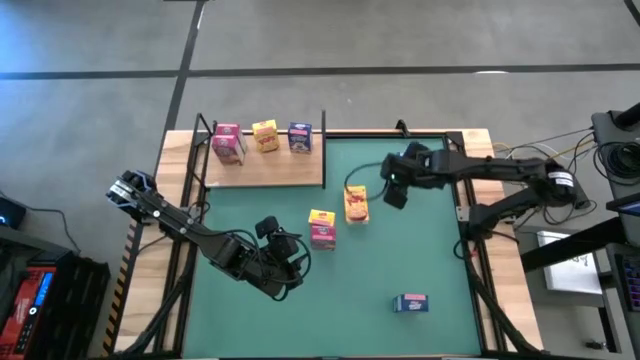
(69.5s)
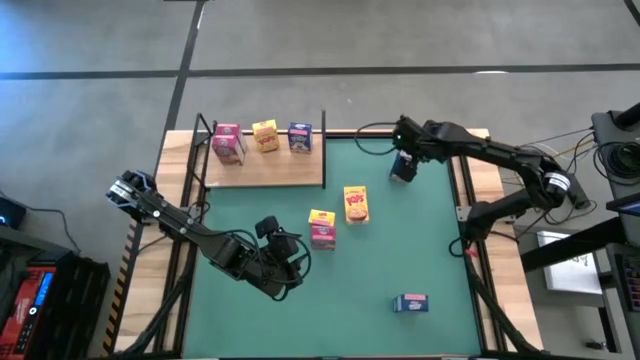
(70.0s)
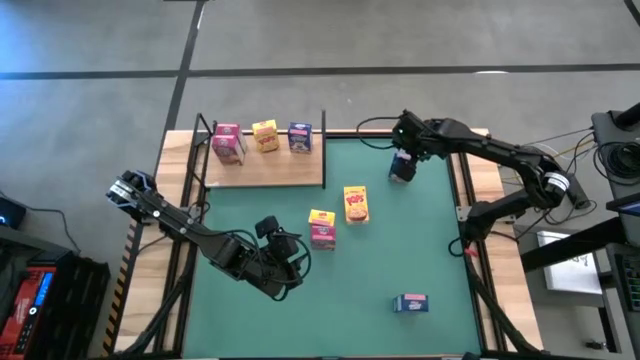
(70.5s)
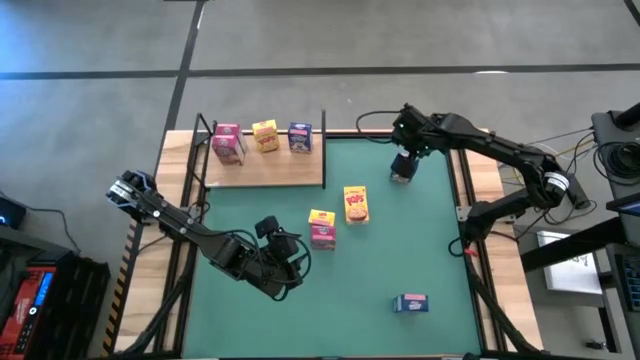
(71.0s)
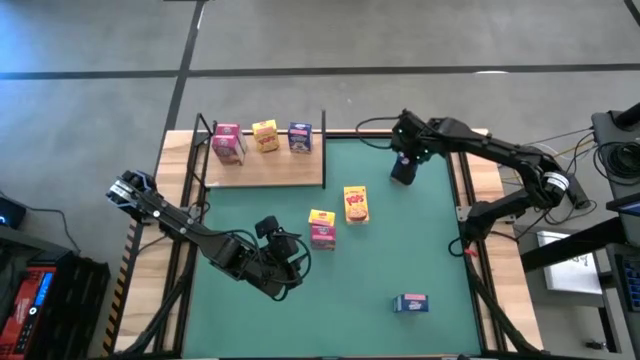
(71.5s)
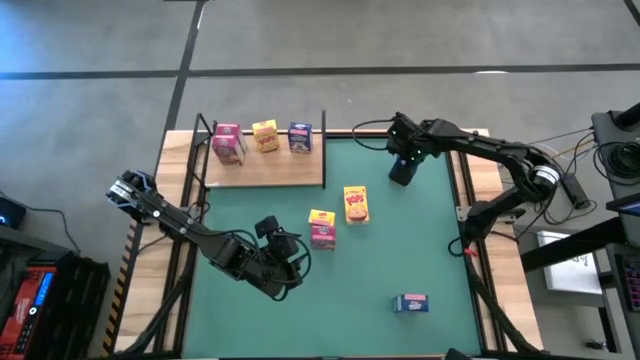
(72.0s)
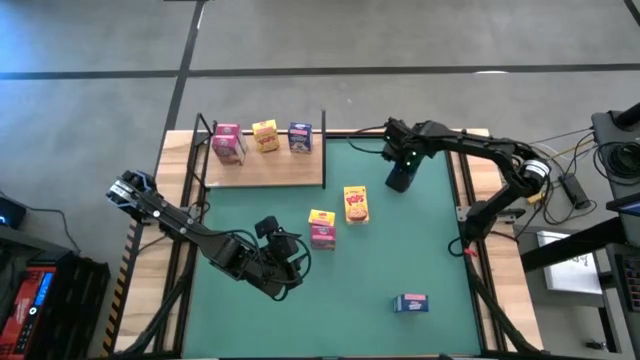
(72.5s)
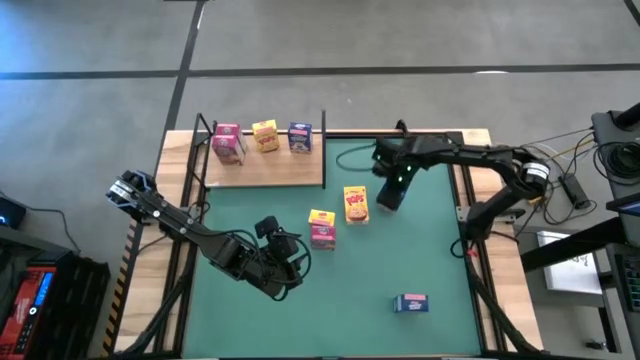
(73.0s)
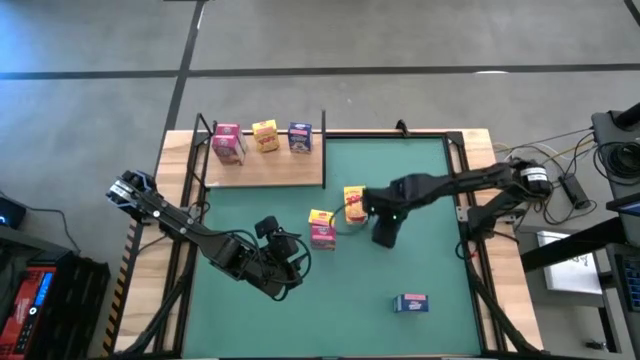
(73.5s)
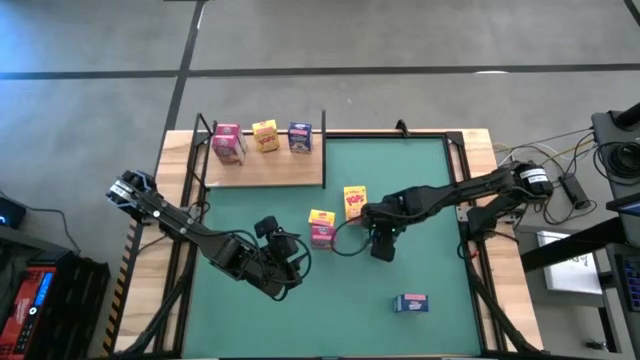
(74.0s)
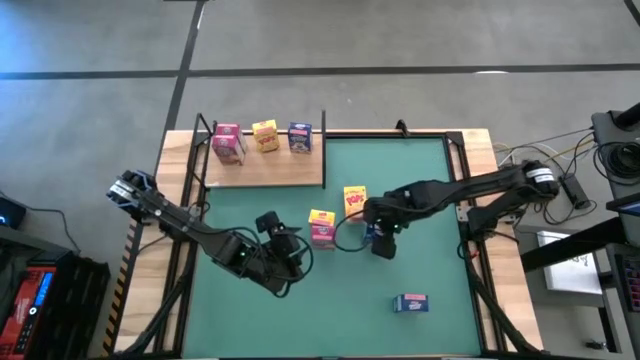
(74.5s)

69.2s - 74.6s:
Task: Stack cereal on shelf
Move the top blue cereal box to the center of the table

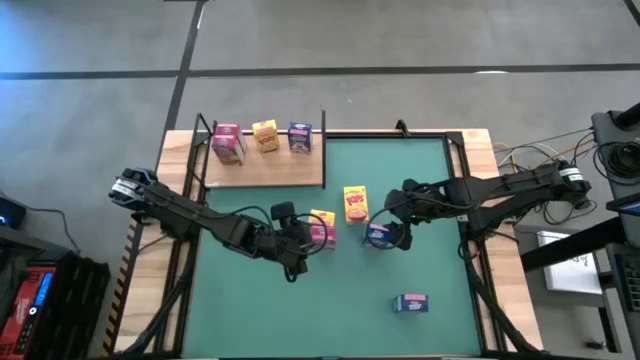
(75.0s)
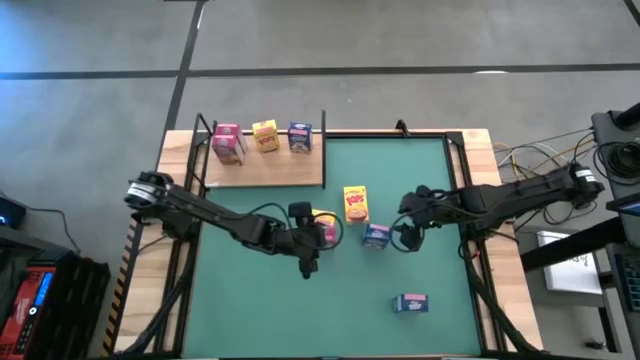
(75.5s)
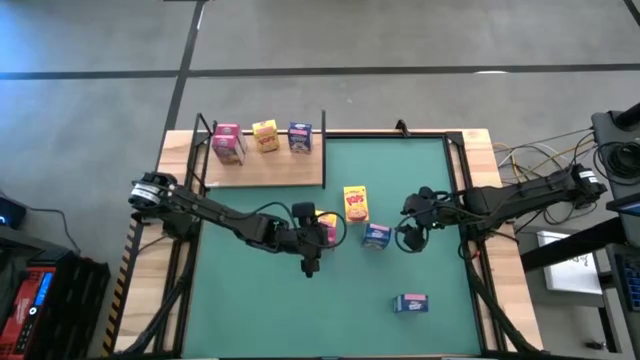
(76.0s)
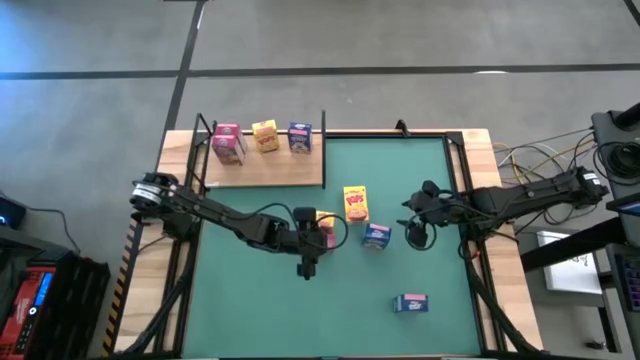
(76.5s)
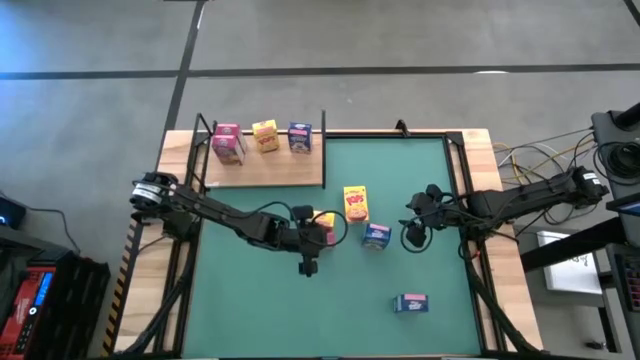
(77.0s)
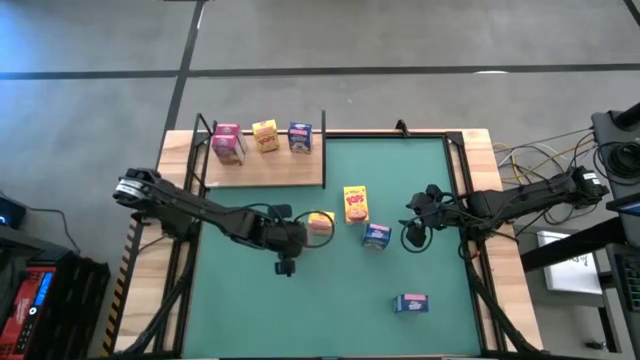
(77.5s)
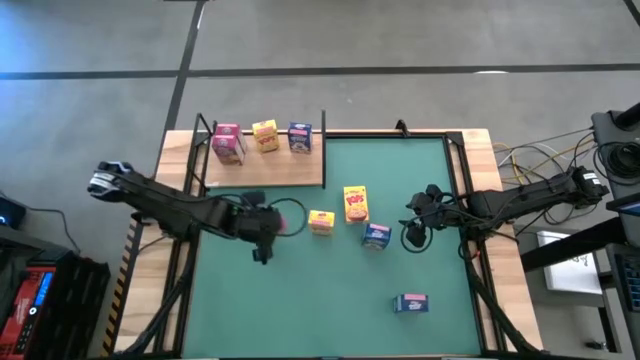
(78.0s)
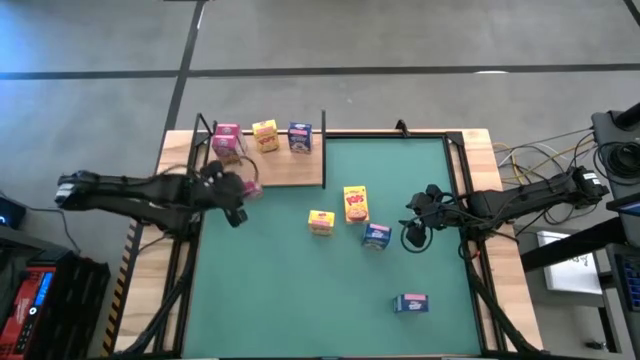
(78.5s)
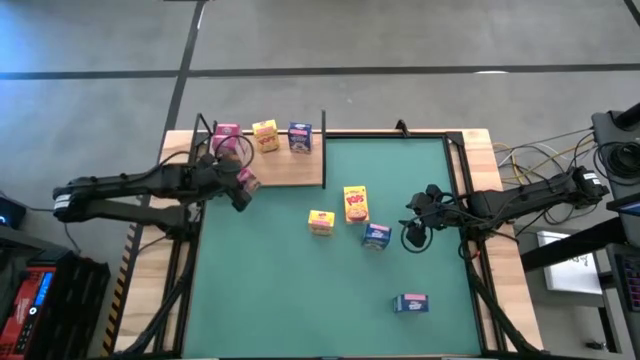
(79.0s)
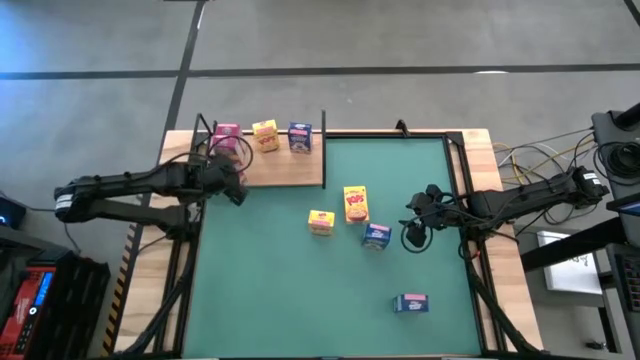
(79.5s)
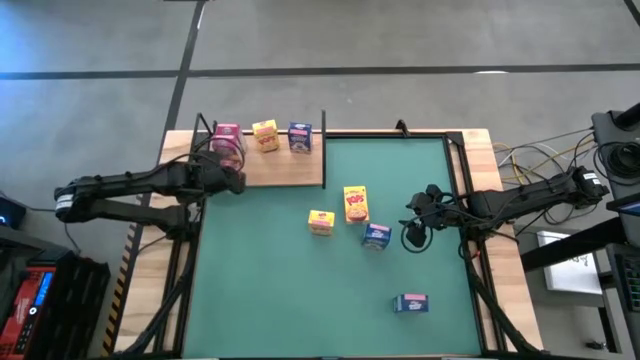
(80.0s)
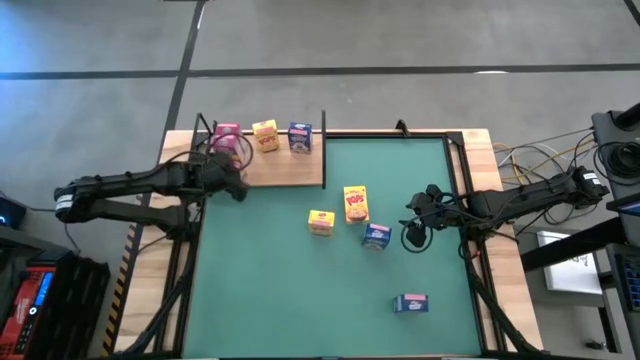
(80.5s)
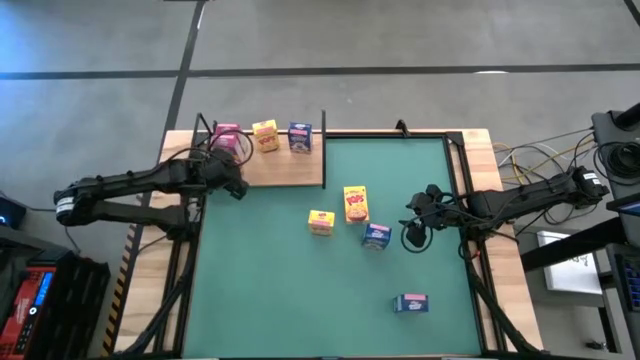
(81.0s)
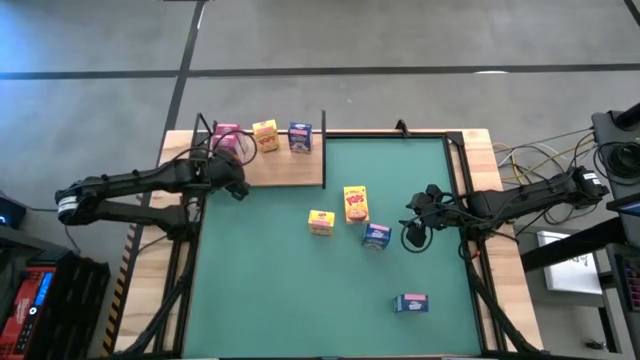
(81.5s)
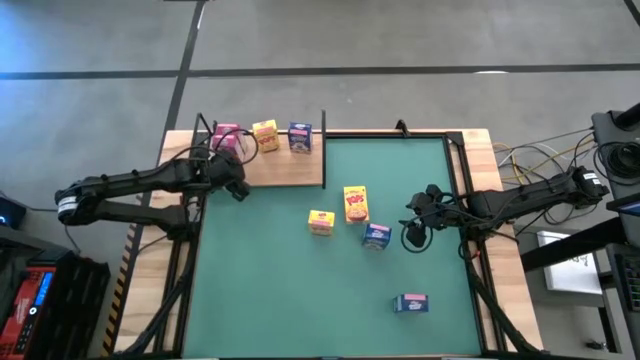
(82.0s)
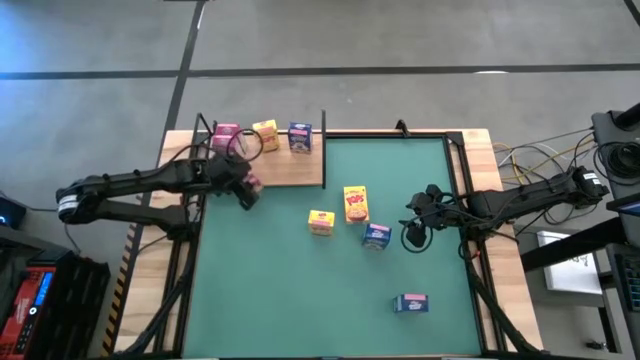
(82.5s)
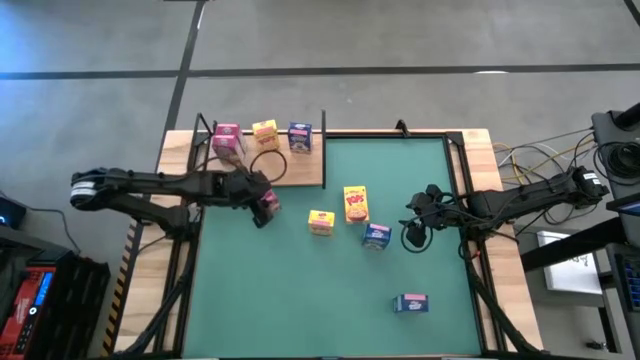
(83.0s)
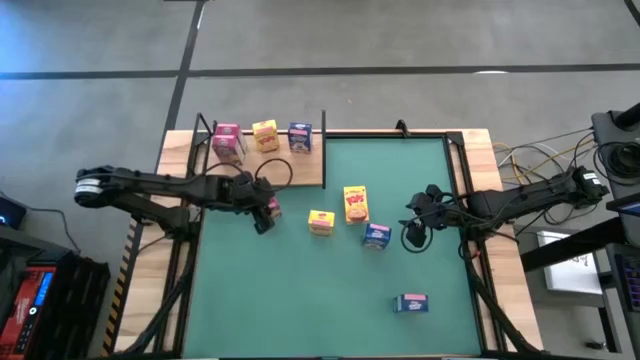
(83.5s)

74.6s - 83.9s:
Put the pink cereal box on the shelf aligned with the pink cereal boxes

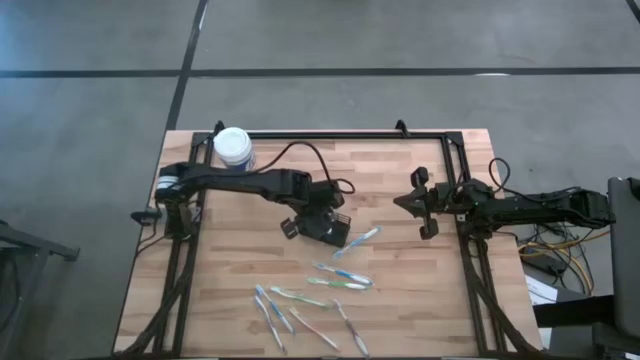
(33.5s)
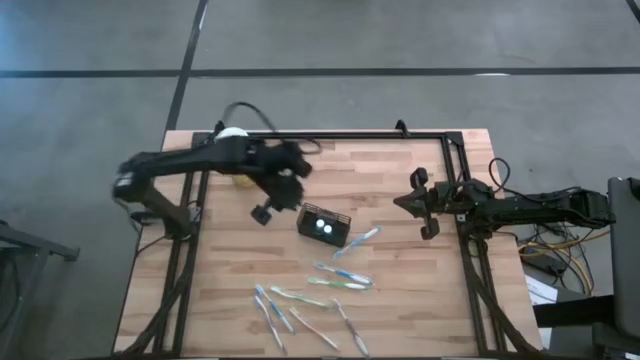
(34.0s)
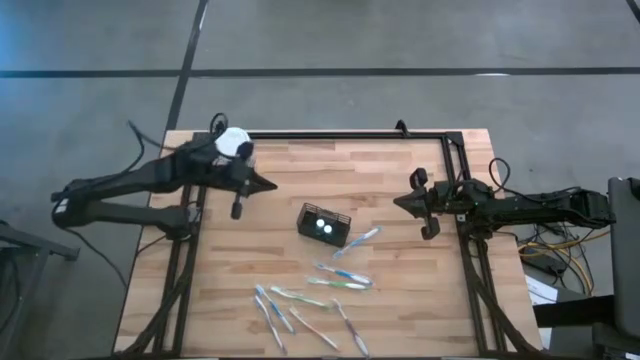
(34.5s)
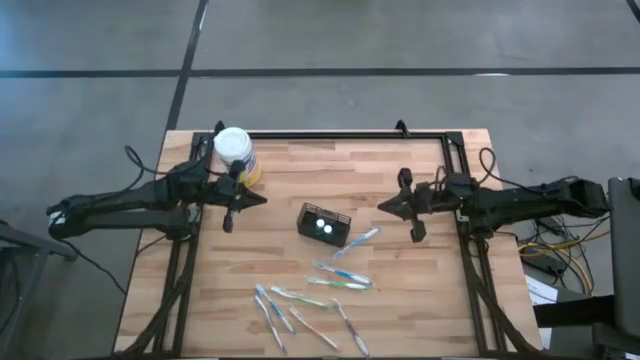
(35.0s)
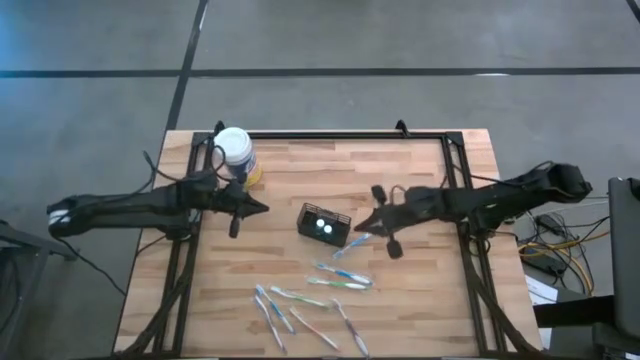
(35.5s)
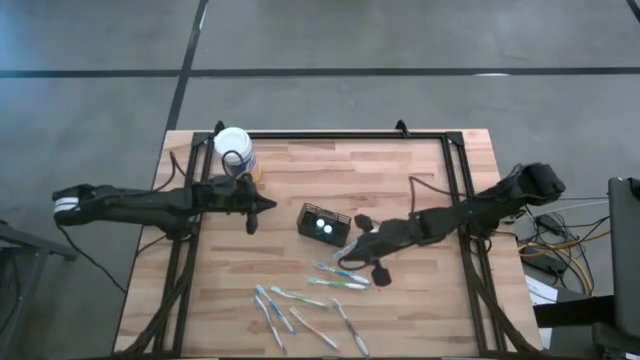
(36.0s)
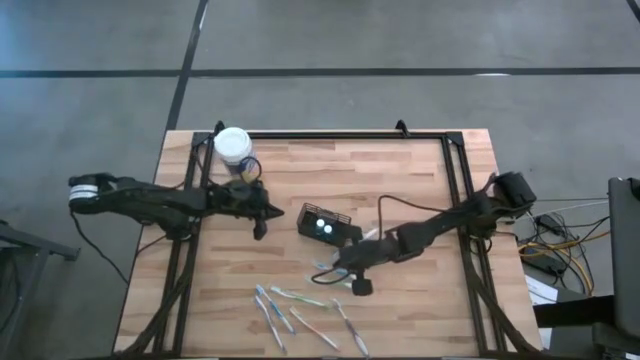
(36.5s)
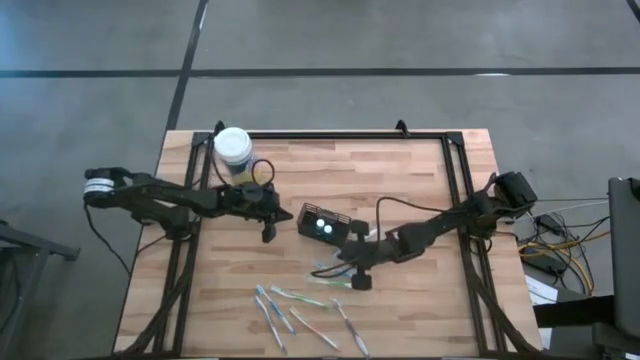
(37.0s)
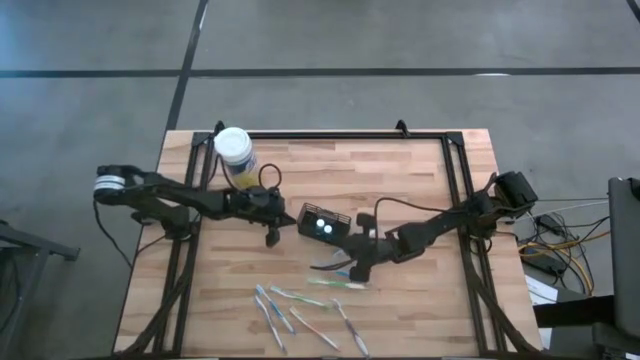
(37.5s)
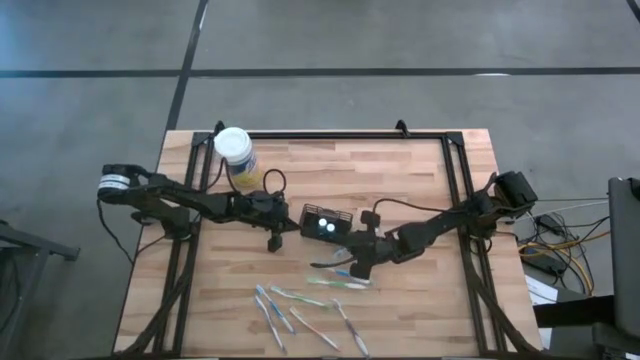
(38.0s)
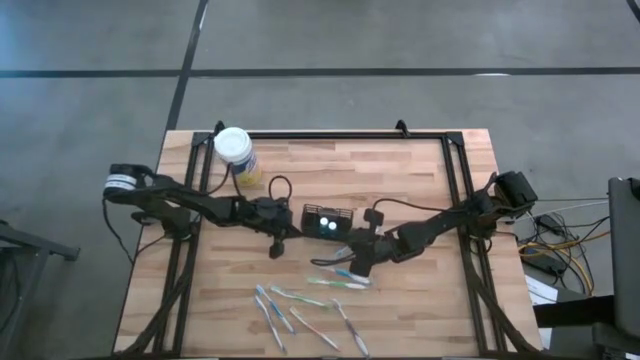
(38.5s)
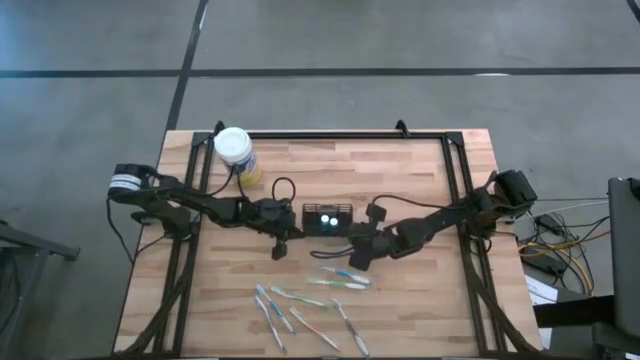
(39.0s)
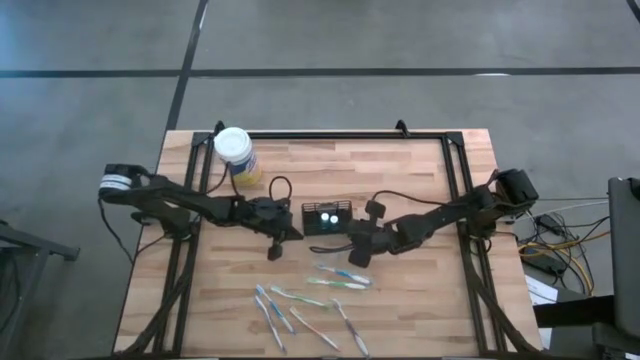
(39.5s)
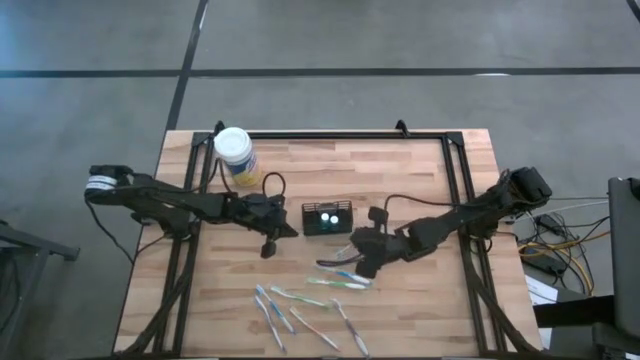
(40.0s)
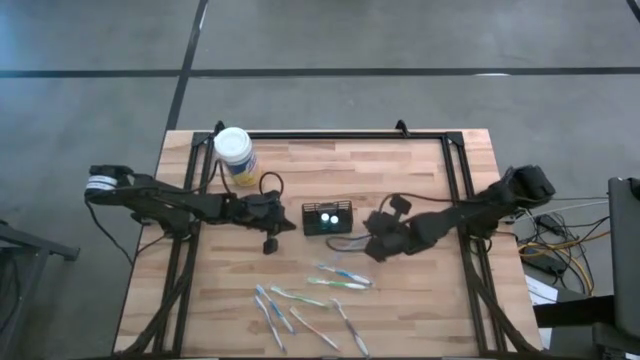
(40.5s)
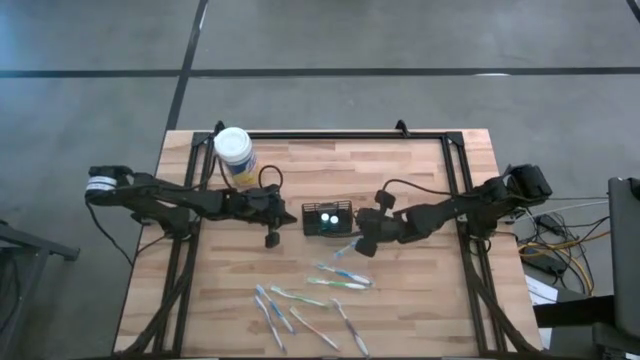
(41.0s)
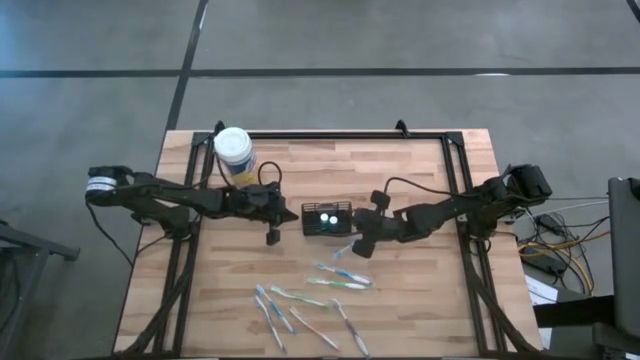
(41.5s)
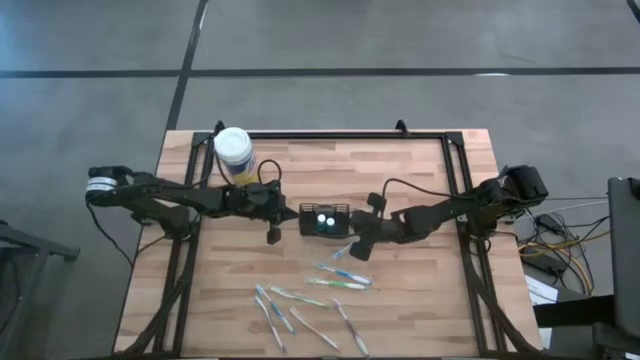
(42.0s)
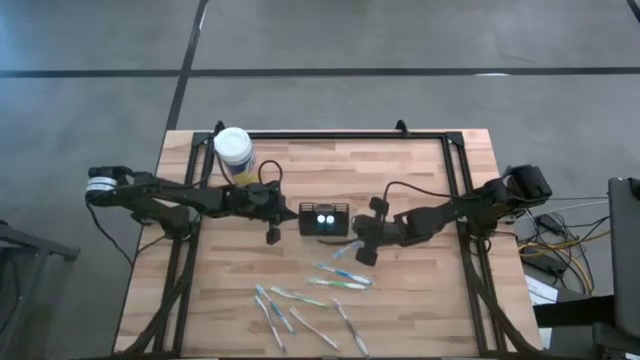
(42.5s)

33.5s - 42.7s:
Task: Pick & Place toothbrushing station
Adjust the mesh organizer
